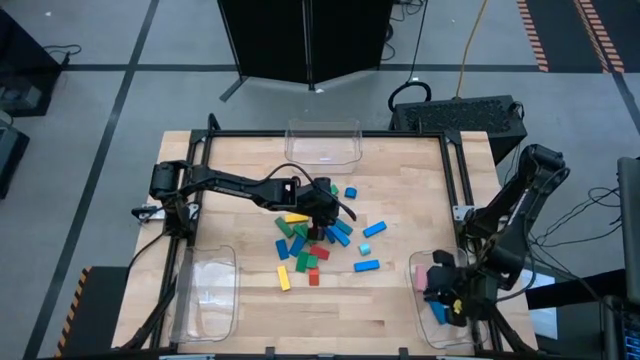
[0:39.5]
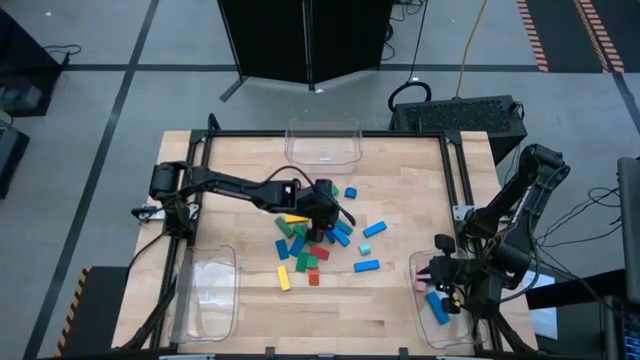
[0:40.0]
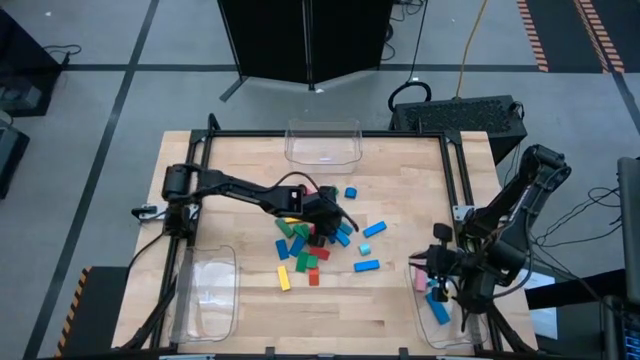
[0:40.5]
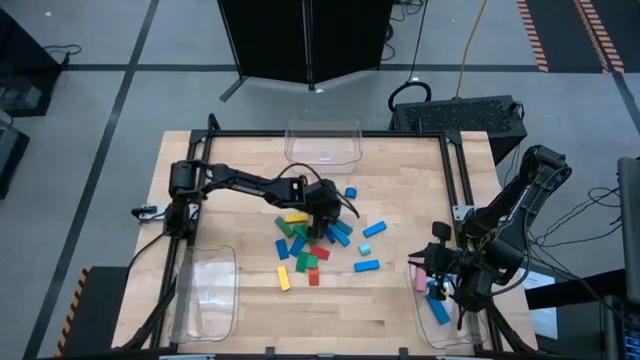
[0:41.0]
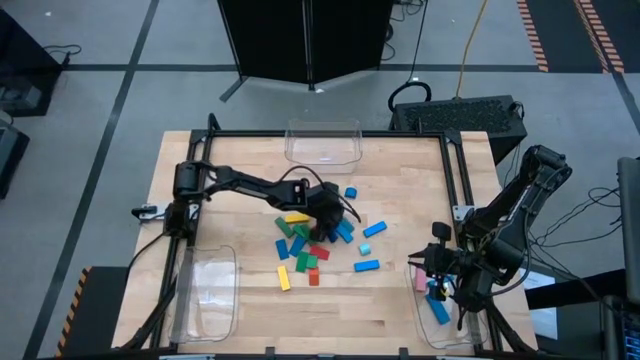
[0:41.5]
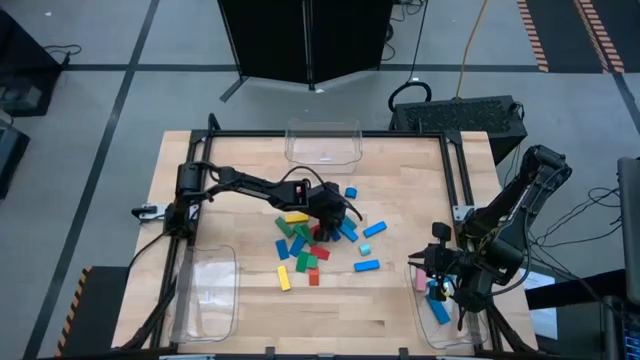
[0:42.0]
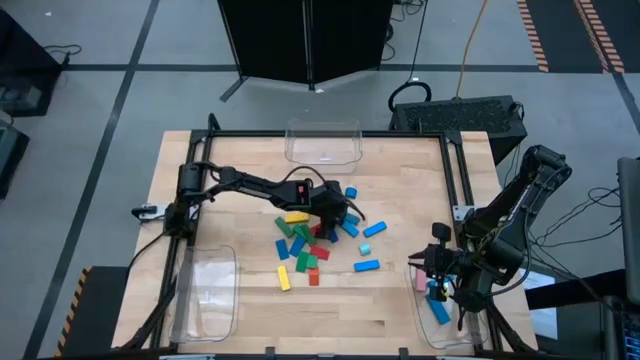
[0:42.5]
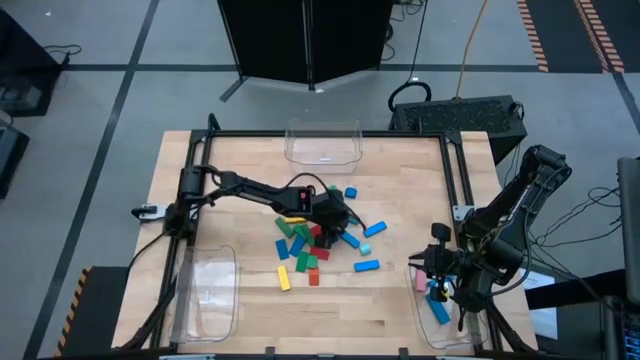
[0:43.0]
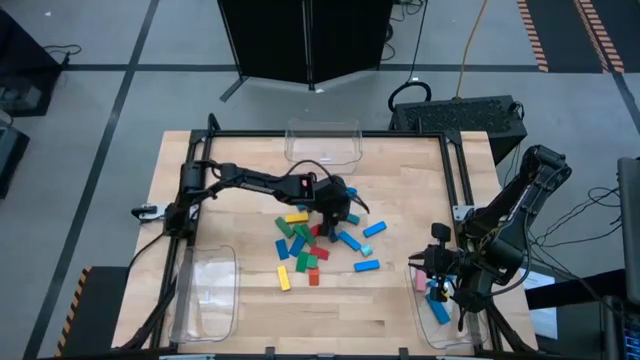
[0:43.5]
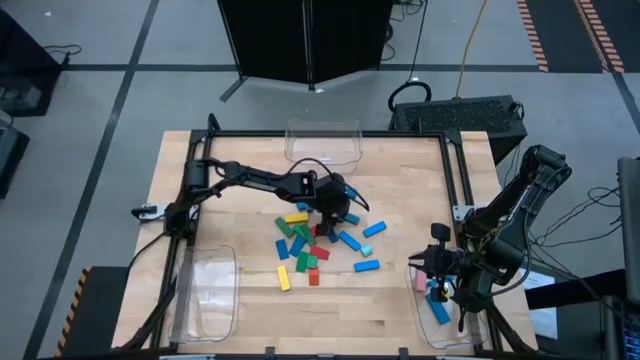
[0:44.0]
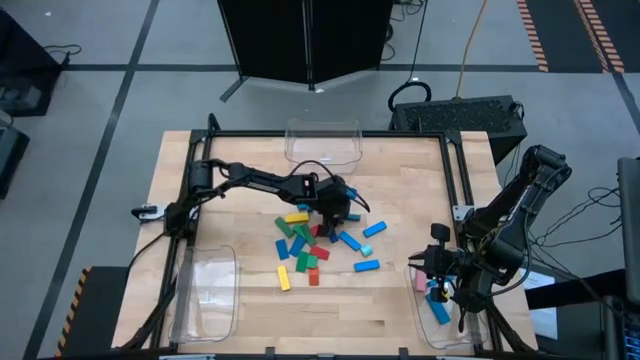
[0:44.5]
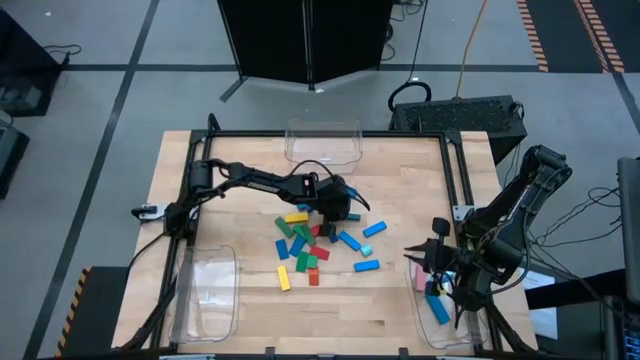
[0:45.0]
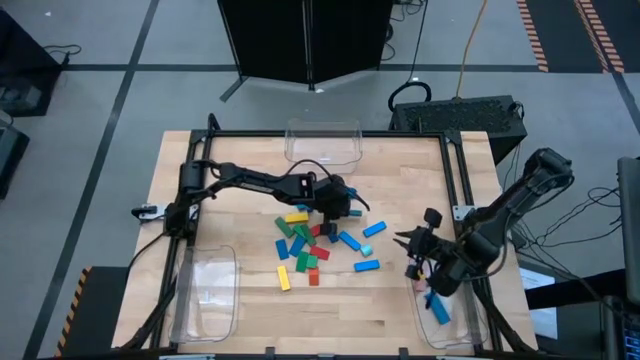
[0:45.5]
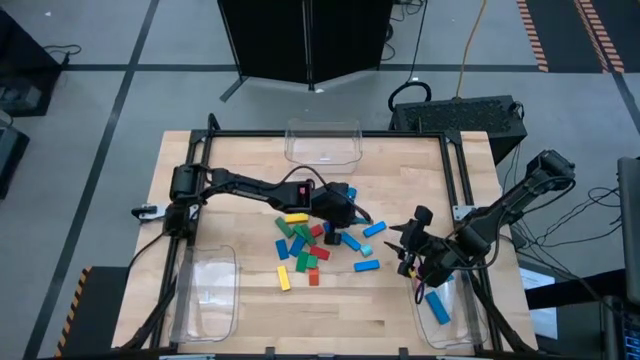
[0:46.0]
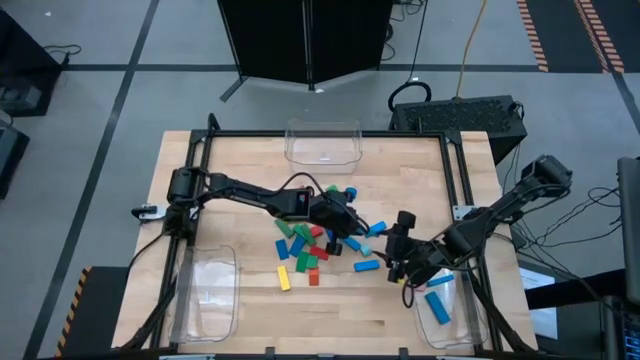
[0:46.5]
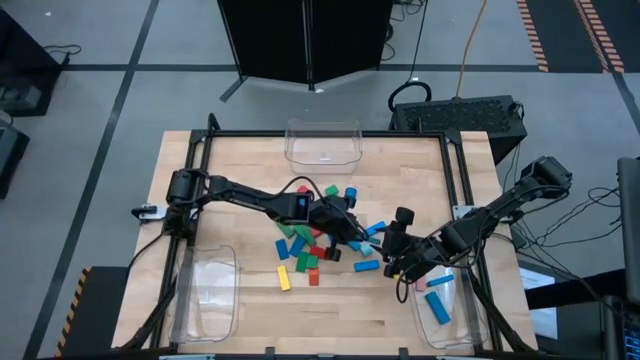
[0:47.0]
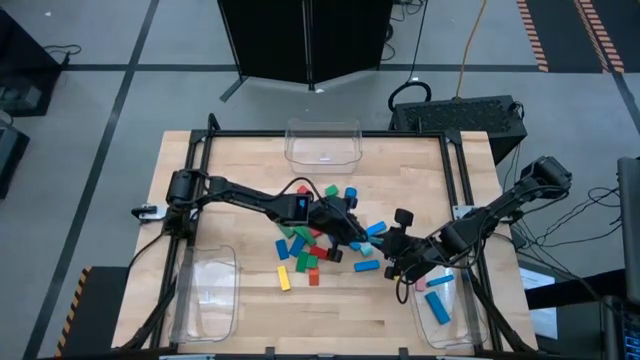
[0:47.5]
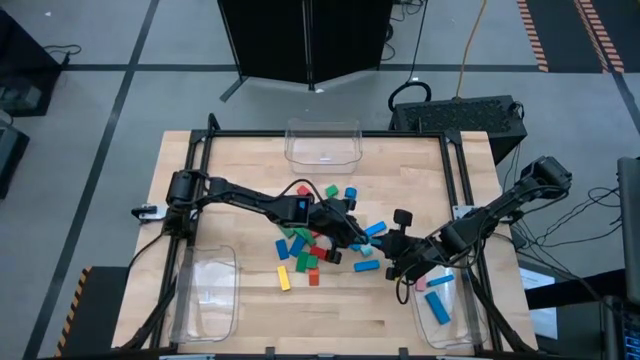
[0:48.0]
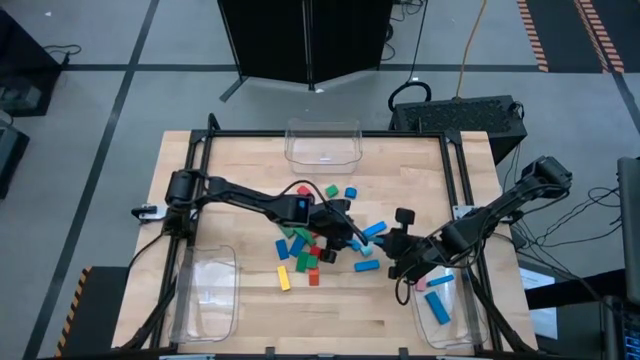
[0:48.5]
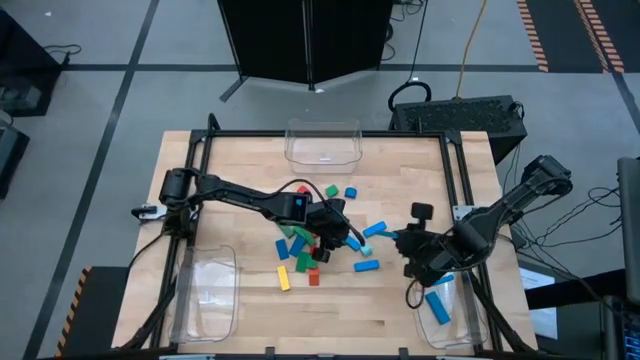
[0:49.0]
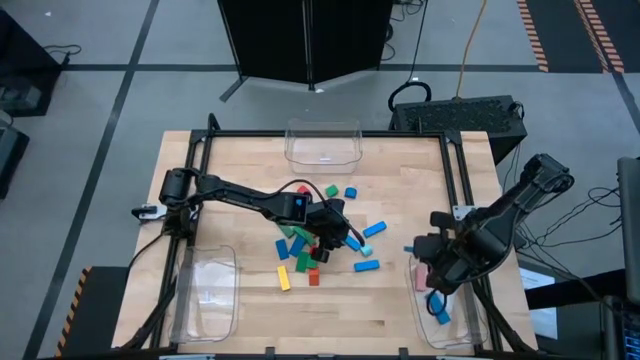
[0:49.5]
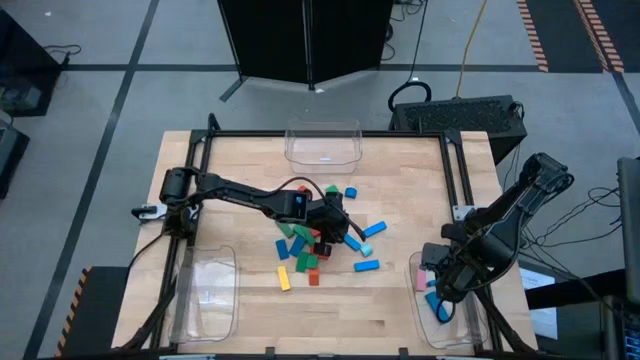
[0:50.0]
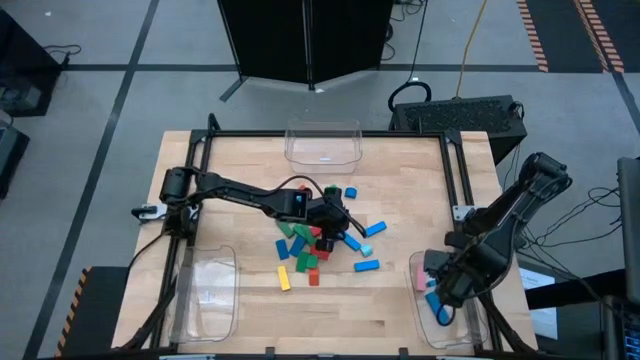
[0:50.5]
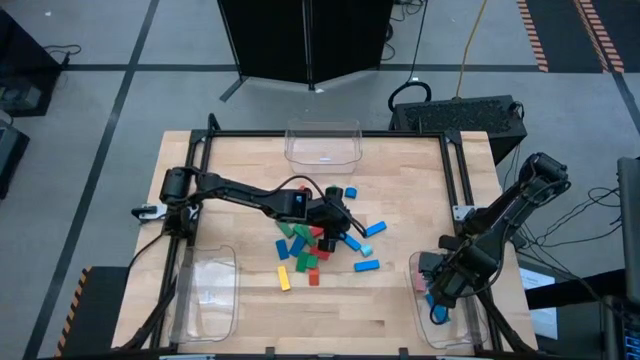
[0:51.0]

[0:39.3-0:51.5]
Task: Sort blocks by size
Put the dark blue rectangle block into the bottom right transparent bin

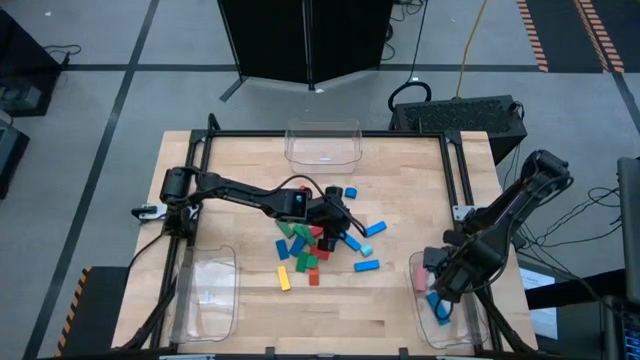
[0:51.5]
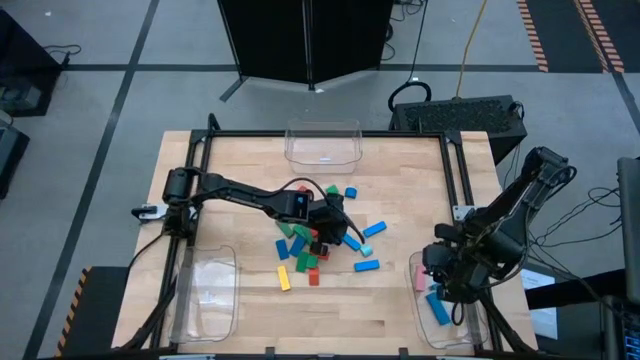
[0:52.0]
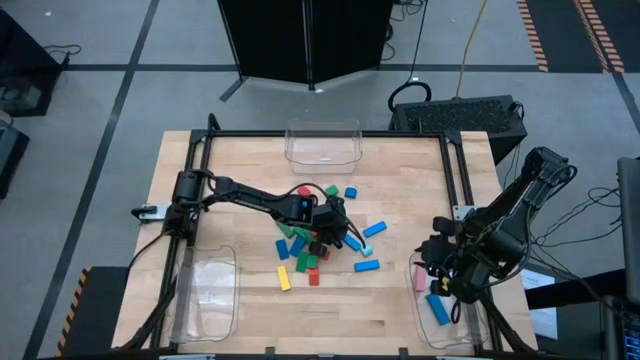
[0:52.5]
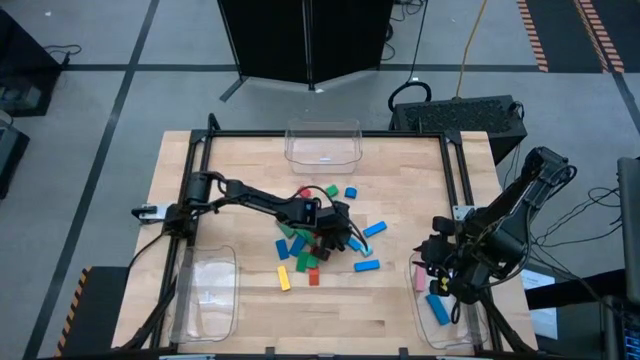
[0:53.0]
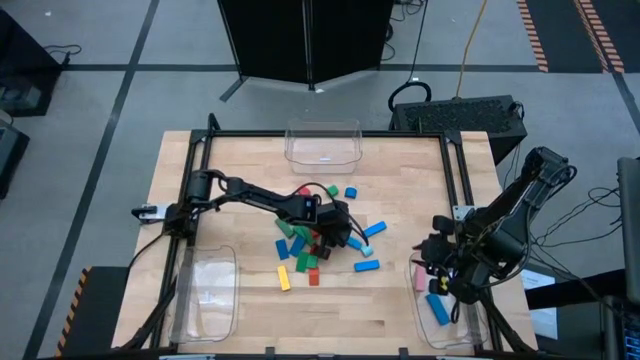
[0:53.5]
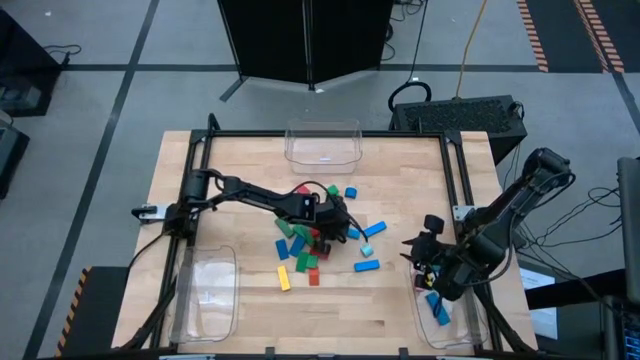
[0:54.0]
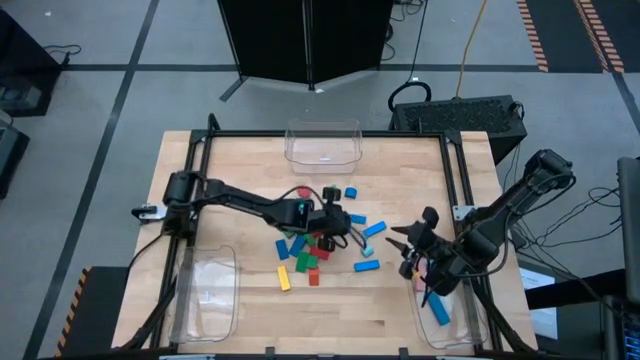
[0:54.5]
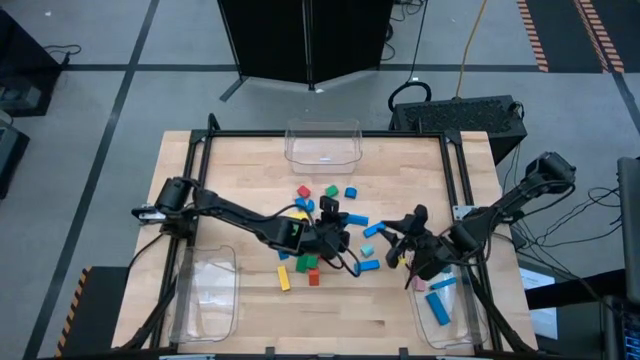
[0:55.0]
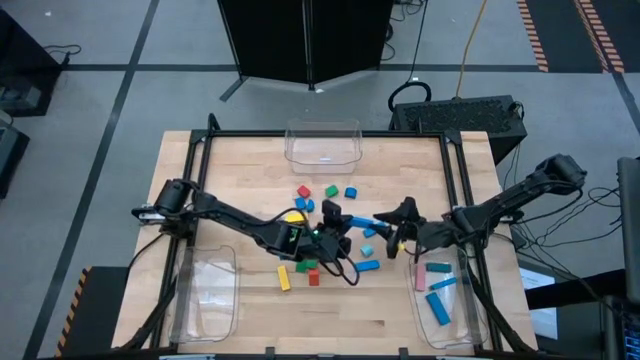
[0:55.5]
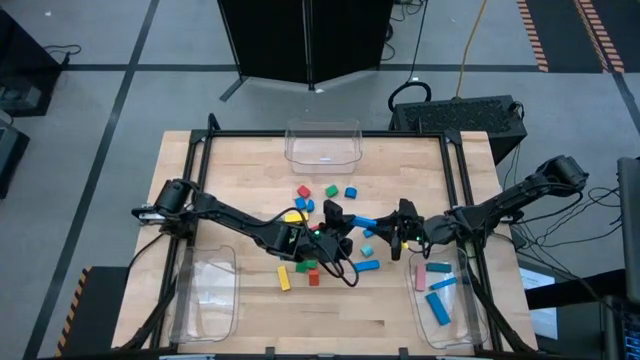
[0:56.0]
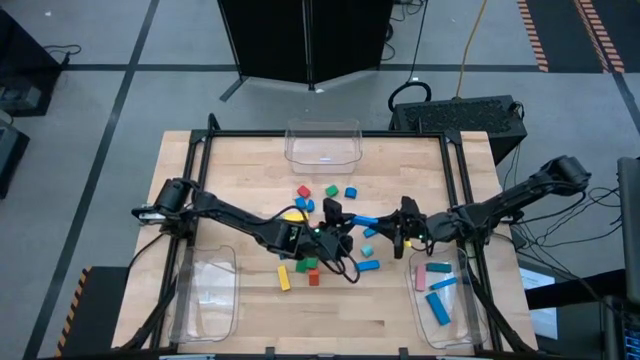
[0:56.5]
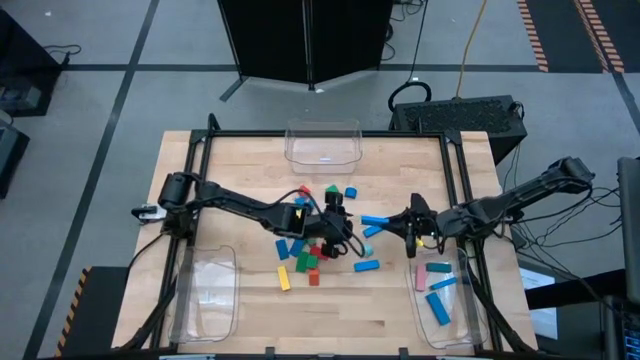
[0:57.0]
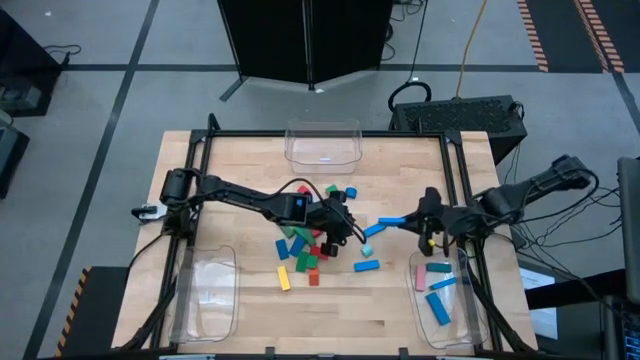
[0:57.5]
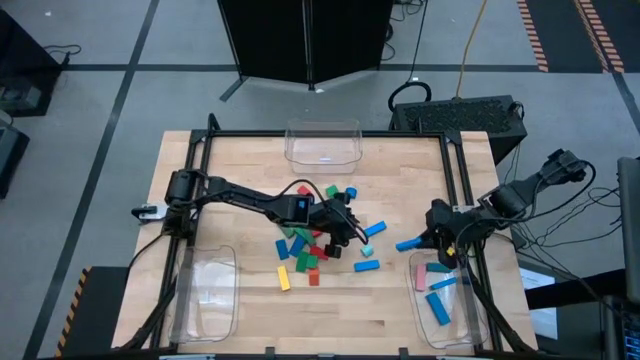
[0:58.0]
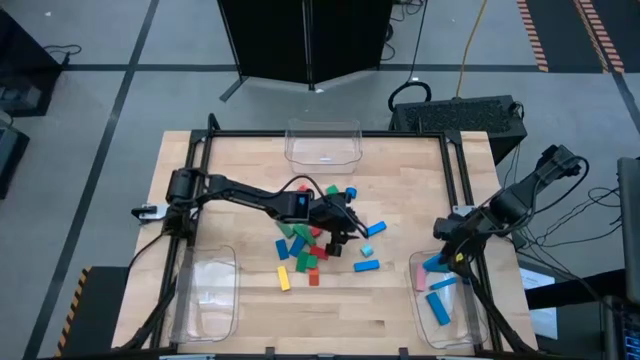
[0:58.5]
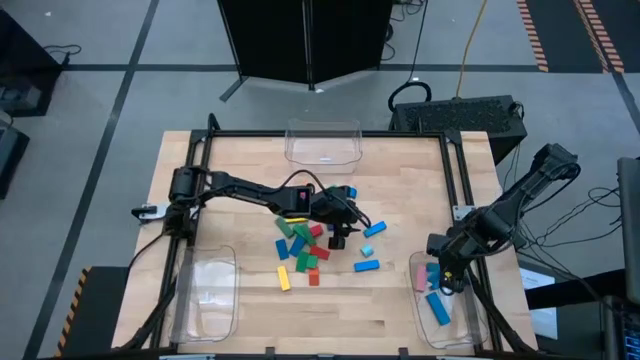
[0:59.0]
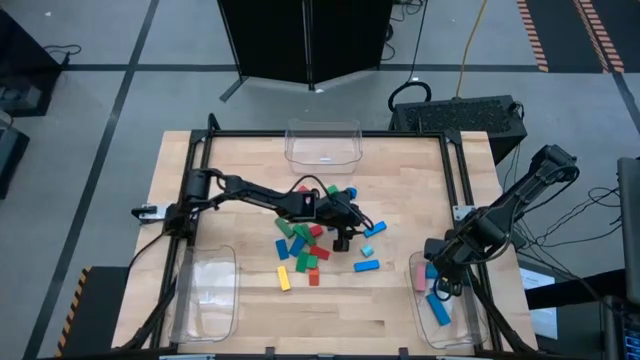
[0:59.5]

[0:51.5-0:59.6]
Put the light blue rectangle block into the bottom right transparent bin

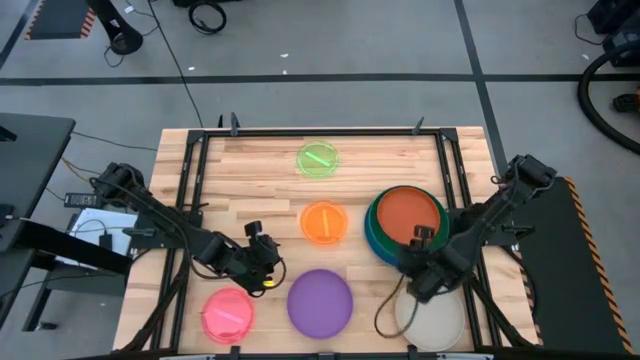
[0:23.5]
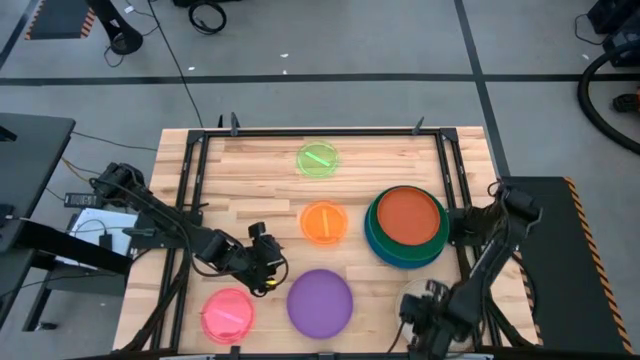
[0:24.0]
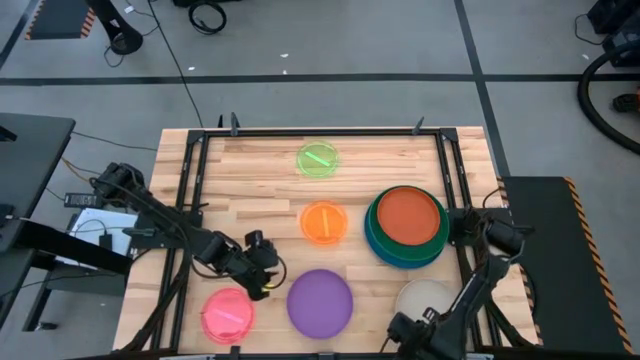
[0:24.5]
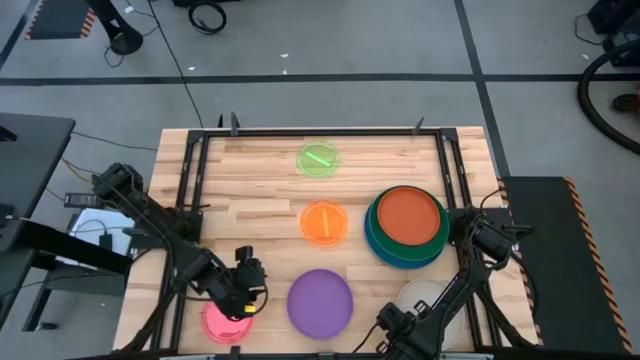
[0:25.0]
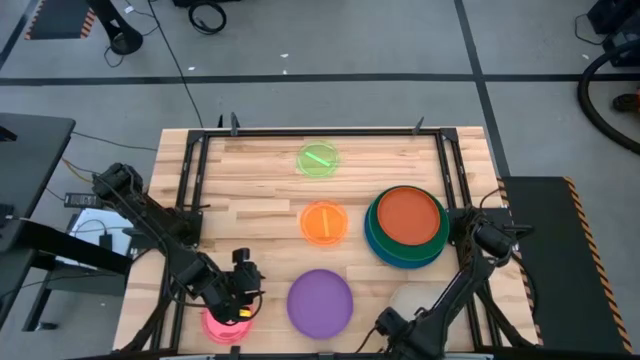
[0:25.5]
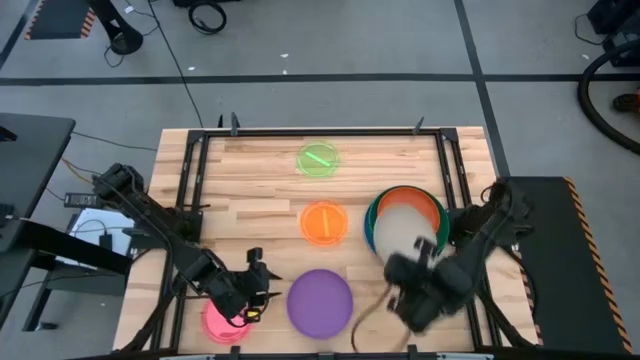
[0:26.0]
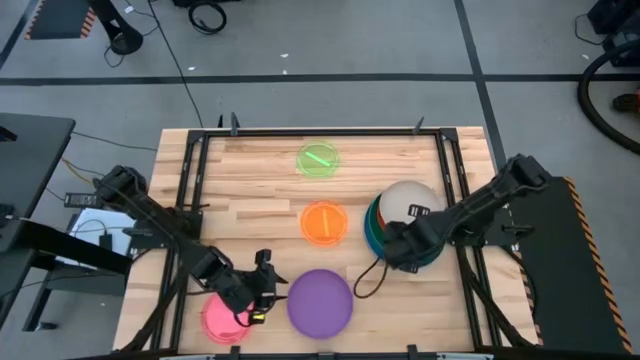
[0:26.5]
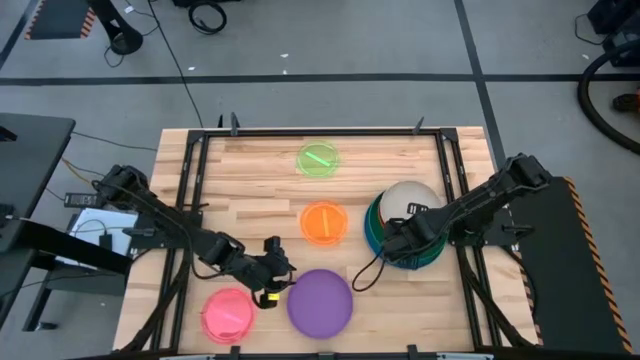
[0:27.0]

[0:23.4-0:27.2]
Task: Stack plastic plates
Stack the gray plate on top of the dark orange plate
